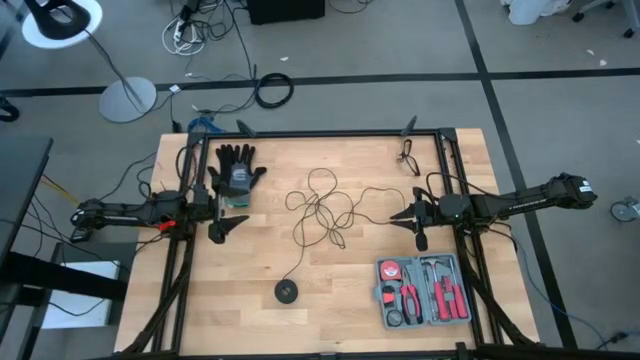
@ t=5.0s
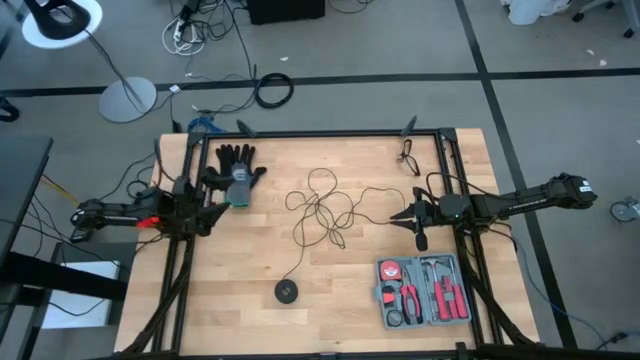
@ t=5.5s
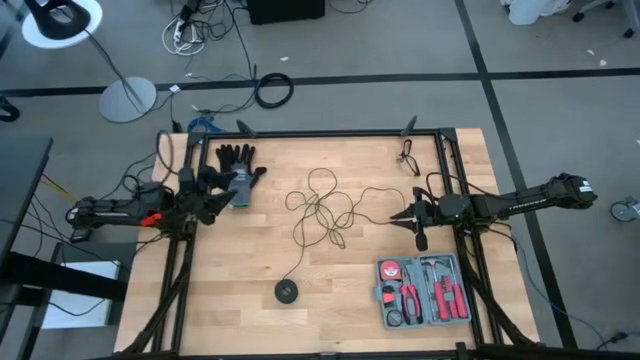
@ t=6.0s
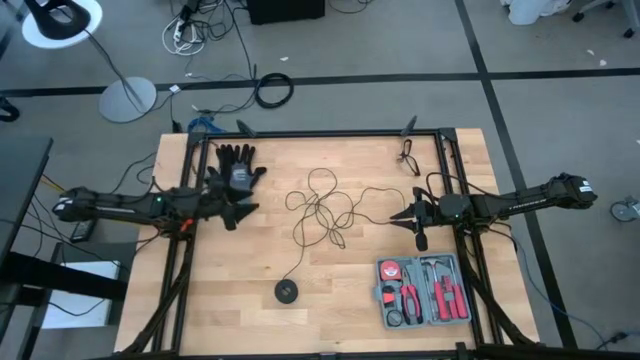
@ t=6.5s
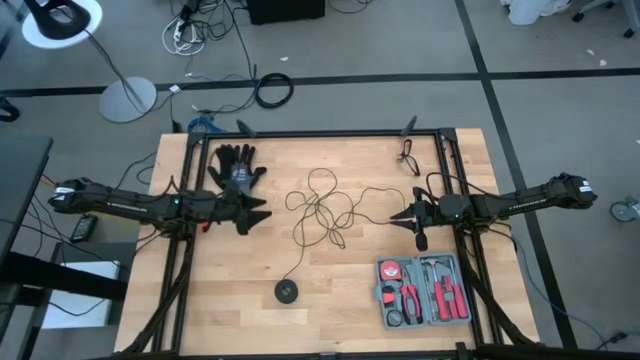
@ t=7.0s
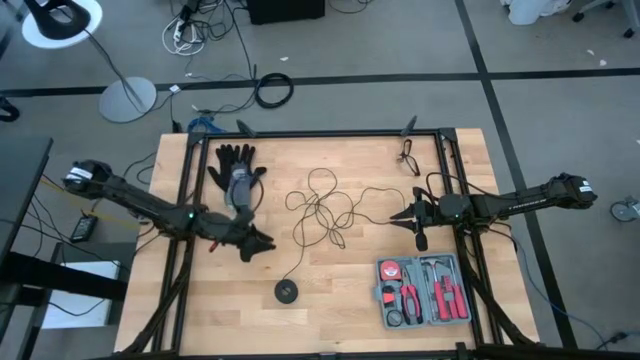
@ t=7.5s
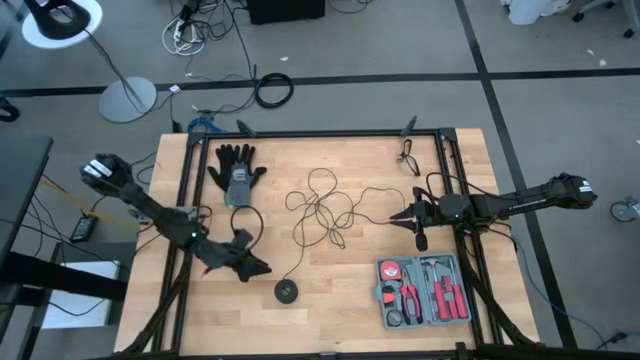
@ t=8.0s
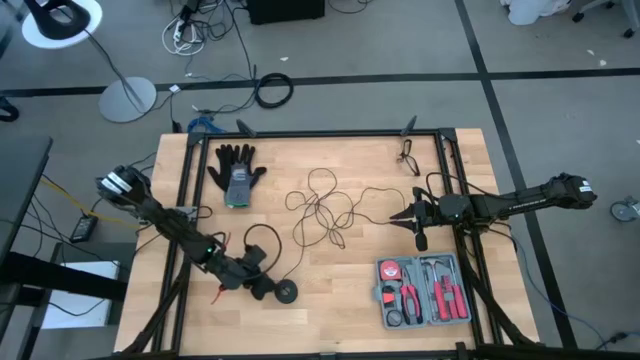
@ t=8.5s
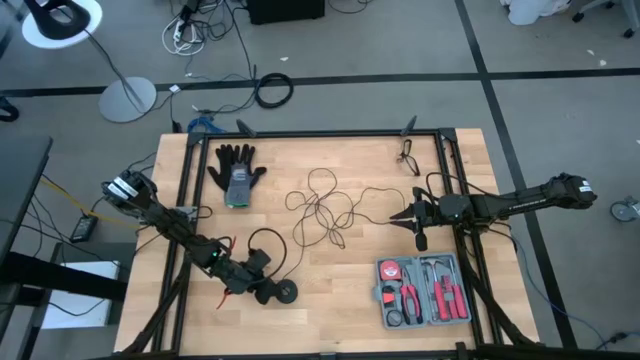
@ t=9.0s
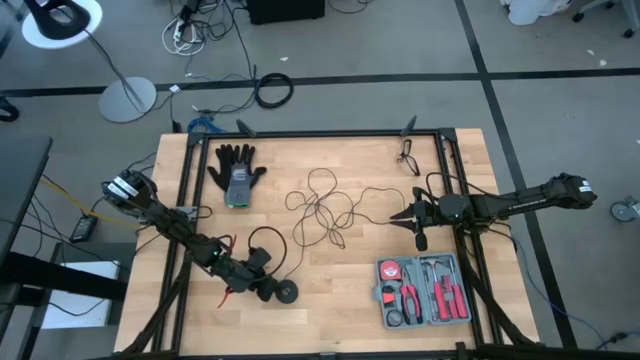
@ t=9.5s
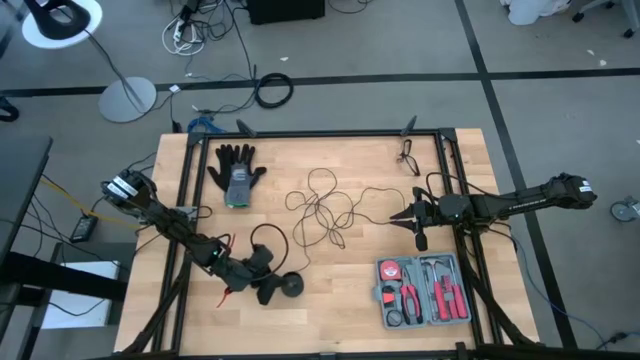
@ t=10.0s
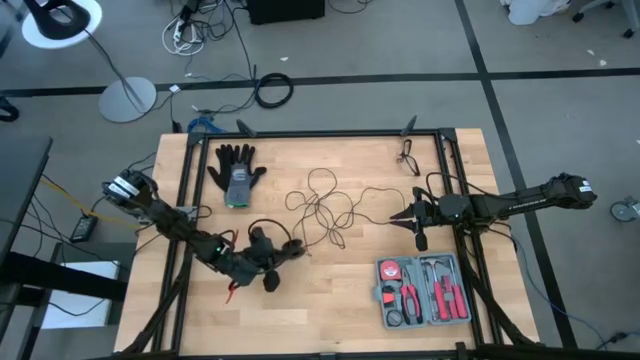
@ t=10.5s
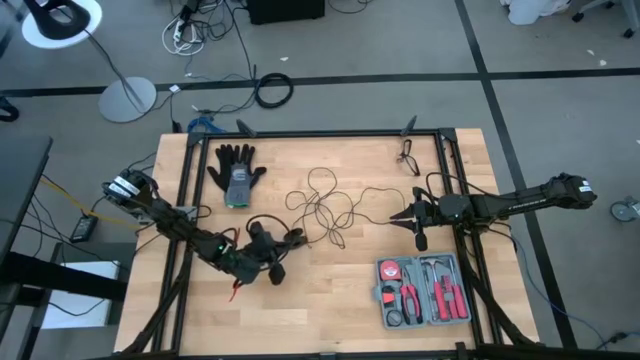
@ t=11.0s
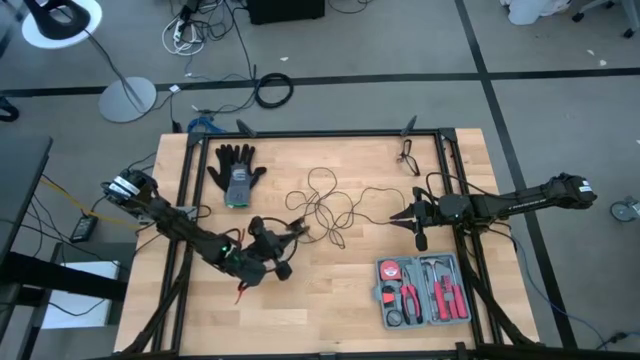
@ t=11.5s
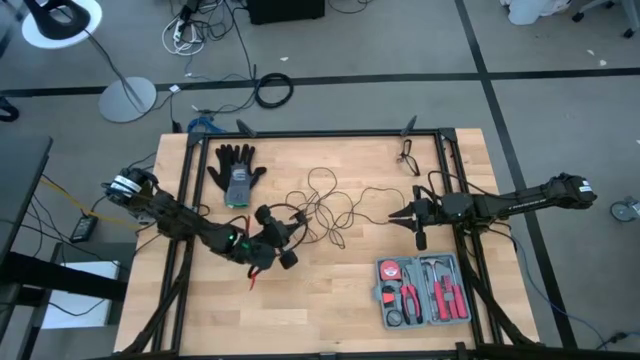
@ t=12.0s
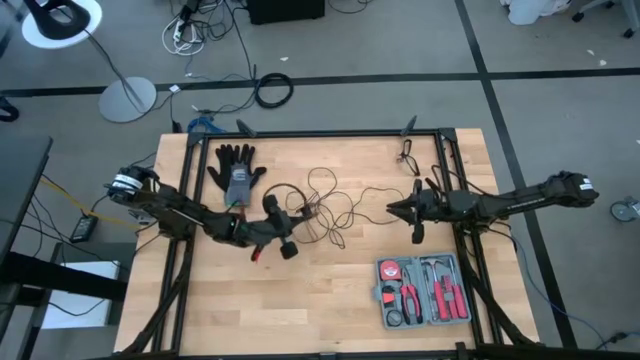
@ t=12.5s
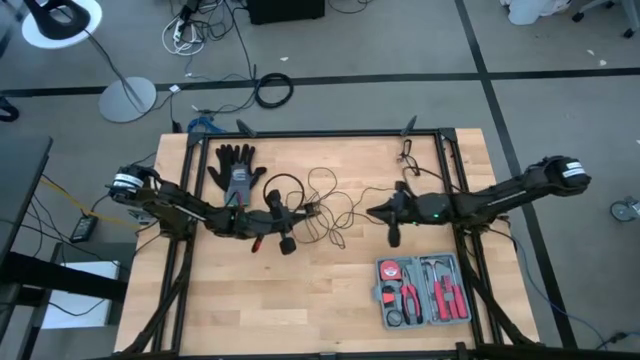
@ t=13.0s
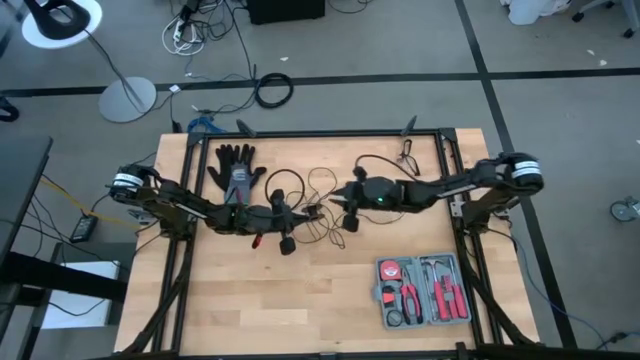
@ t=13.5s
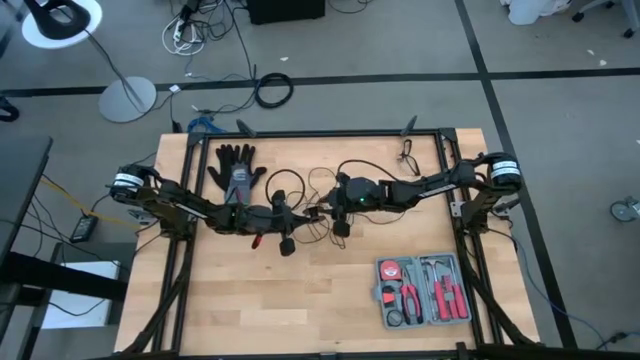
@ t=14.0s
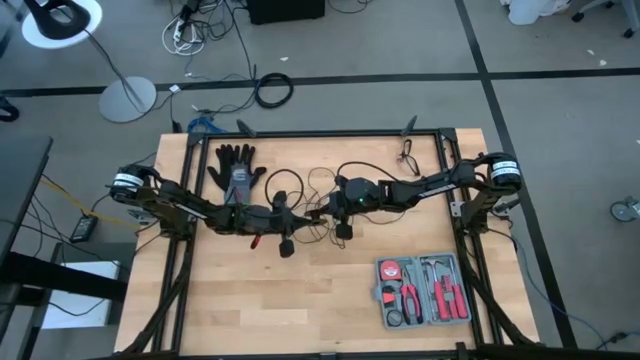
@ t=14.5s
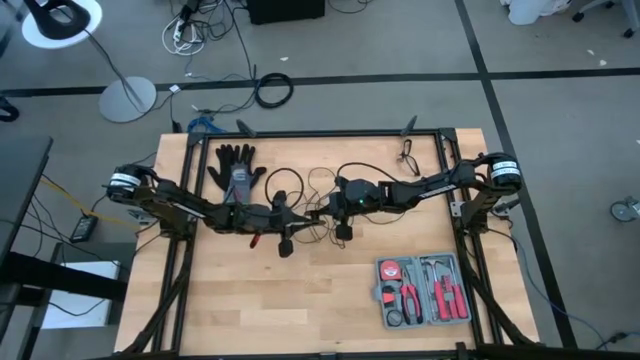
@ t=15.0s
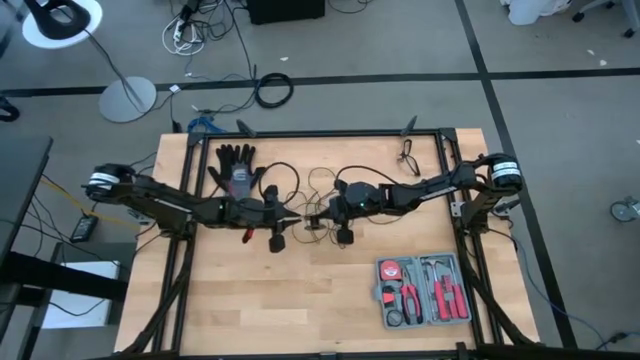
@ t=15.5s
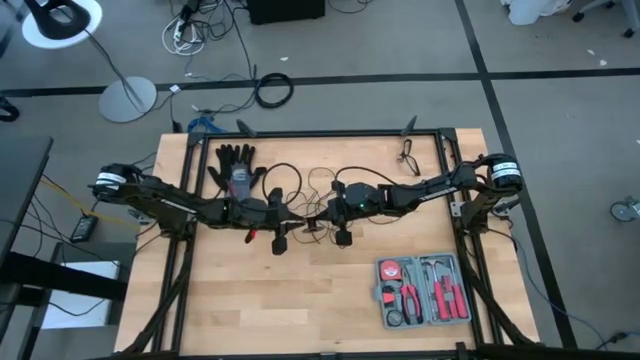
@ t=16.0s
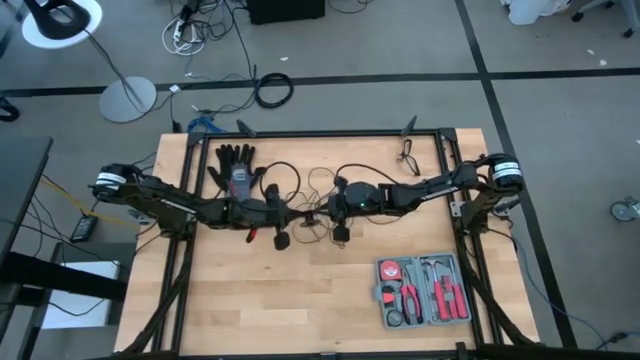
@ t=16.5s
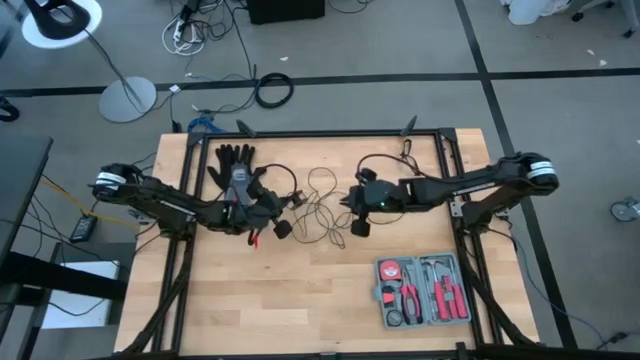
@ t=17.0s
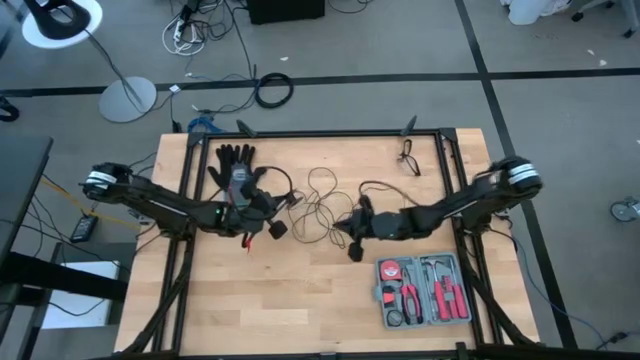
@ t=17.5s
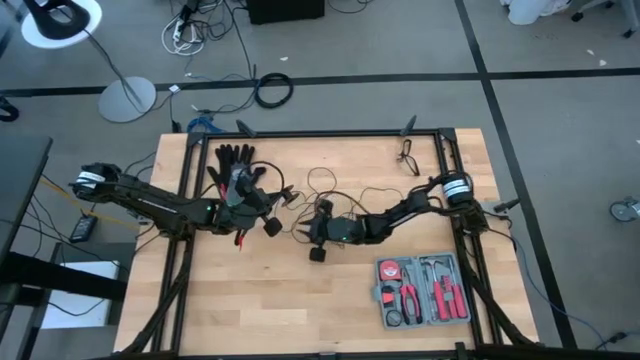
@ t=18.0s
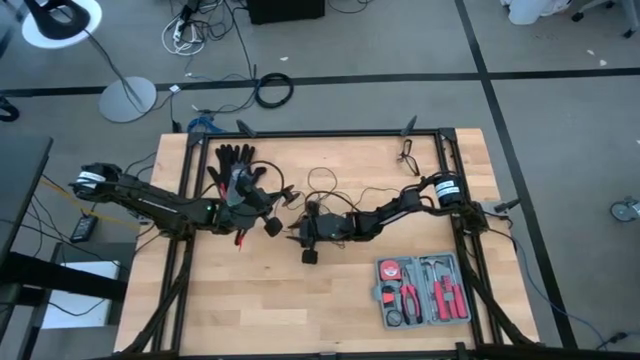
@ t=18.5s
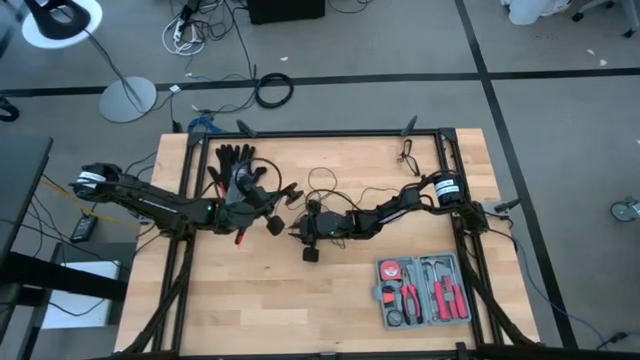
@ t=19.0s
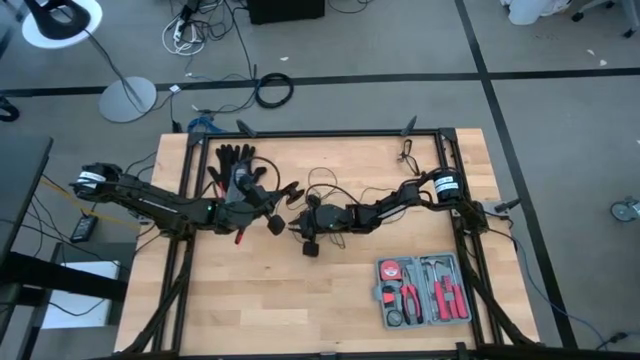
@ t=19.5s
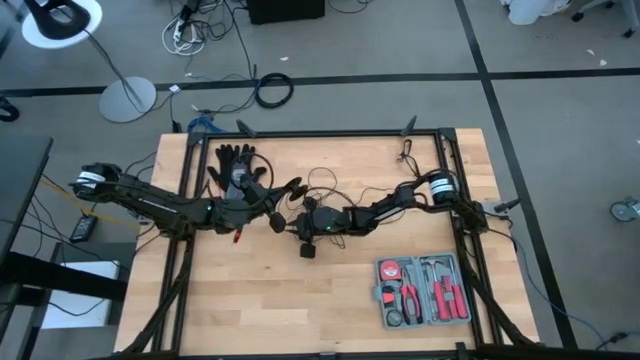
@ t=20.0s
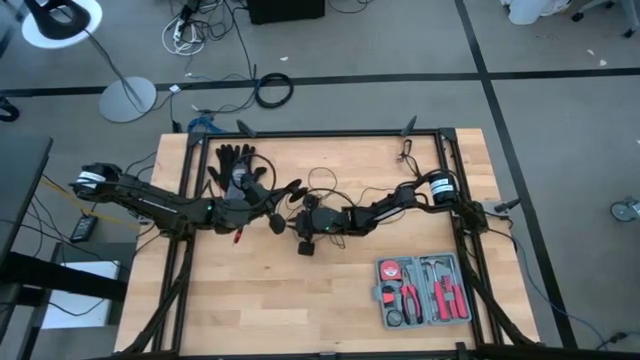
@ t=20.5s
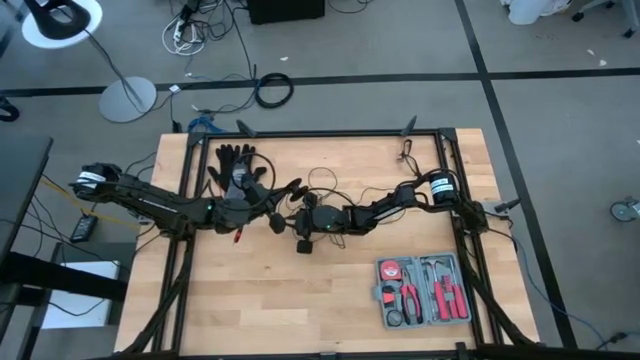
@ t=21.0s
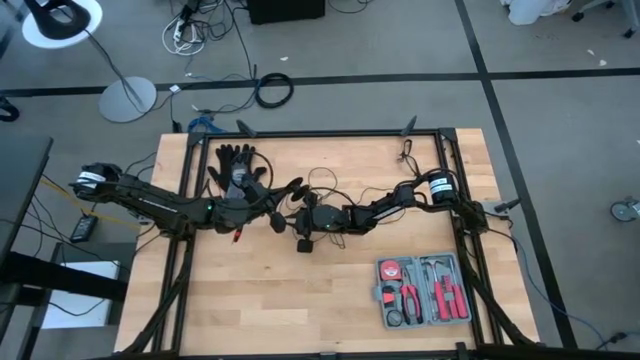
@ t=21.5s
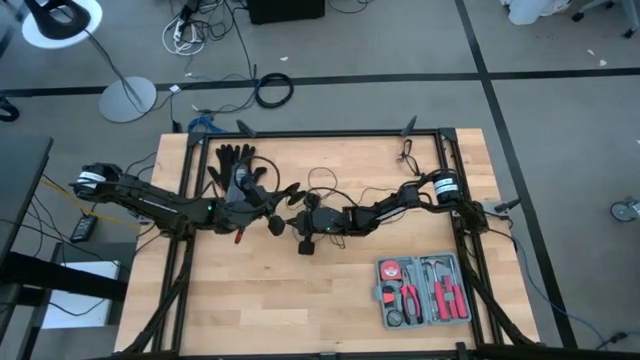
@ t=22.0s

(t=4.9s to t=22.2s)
Task: Coil cords
Coil the black wire

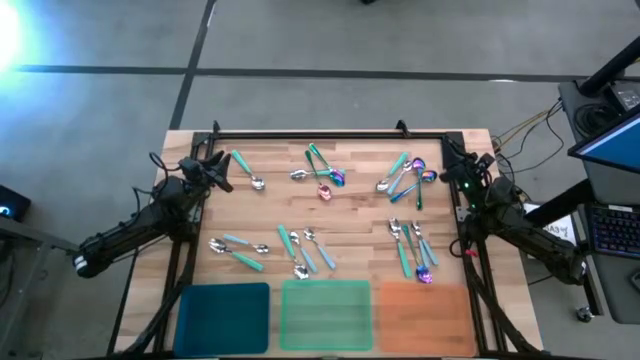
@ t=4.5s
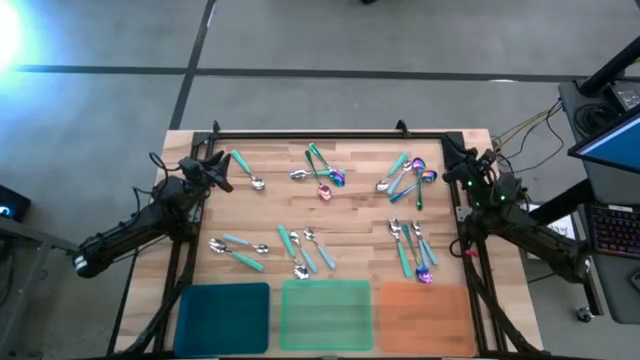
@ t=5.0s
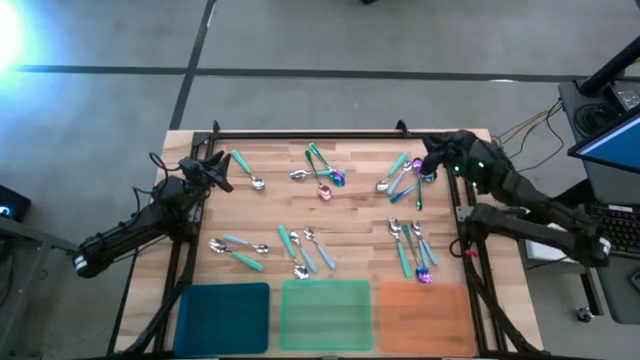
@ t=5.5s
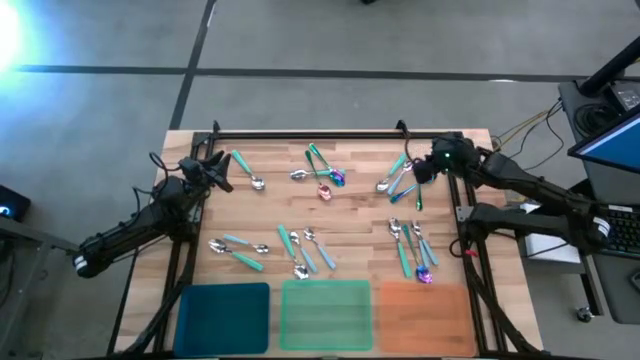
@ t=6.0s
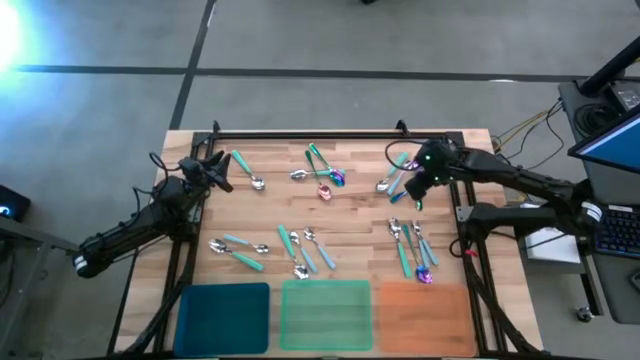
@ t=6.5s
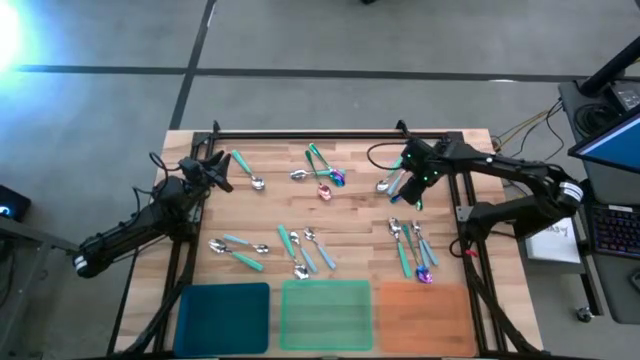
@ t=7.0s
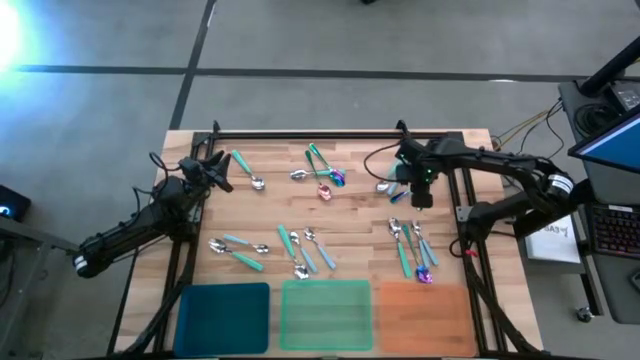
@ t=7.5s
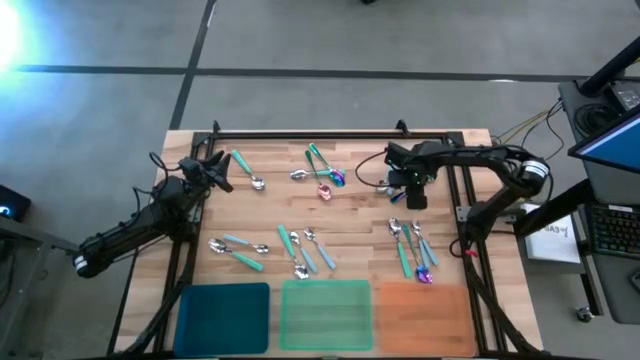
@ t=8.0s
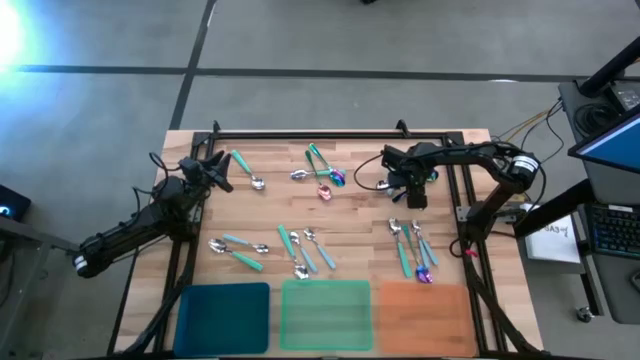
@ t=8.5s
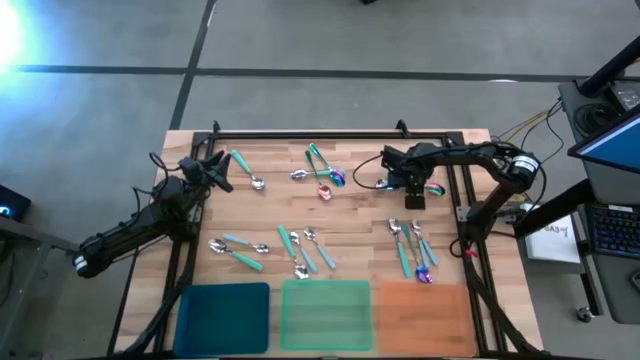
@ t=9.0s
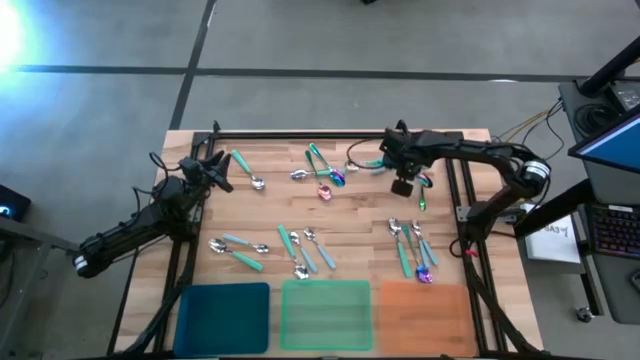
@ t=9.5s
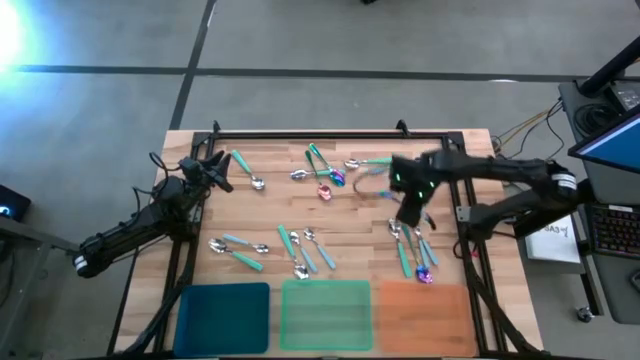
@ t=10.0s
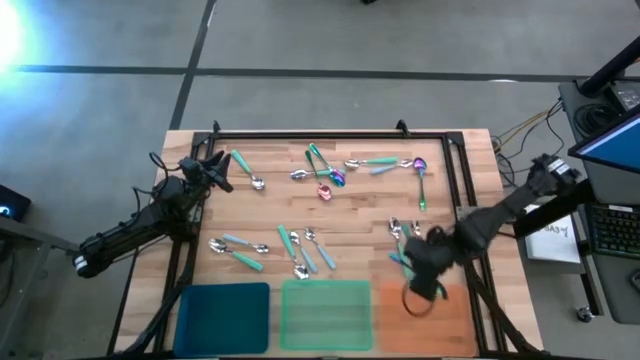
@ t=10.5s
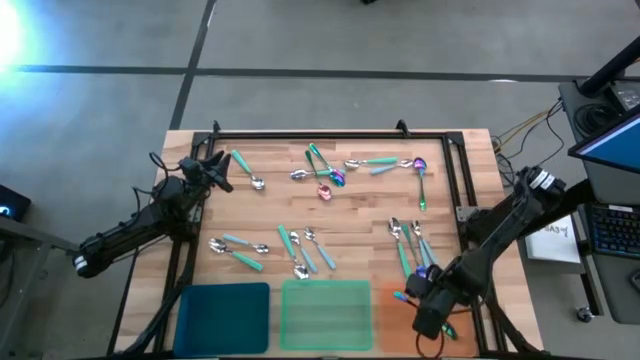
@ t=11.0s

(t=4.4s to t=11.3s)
Task: Sort silverware by color (type)
Put the blue spoon into the orange bin
